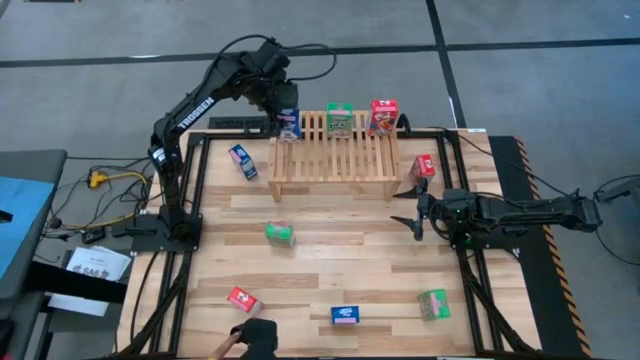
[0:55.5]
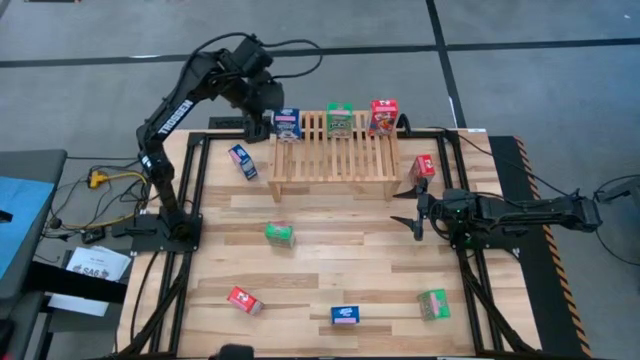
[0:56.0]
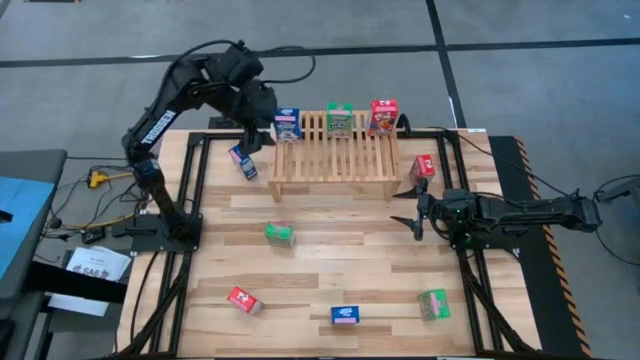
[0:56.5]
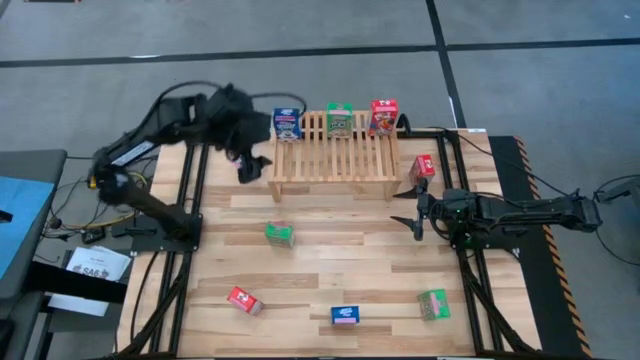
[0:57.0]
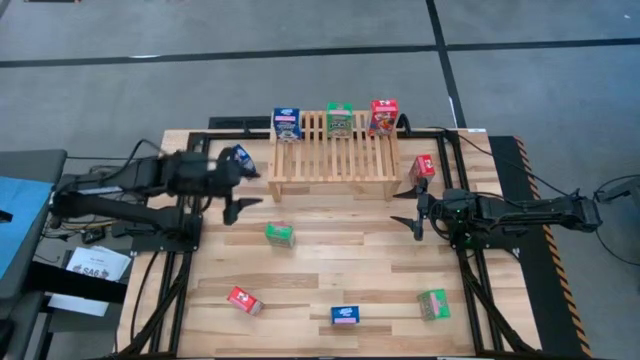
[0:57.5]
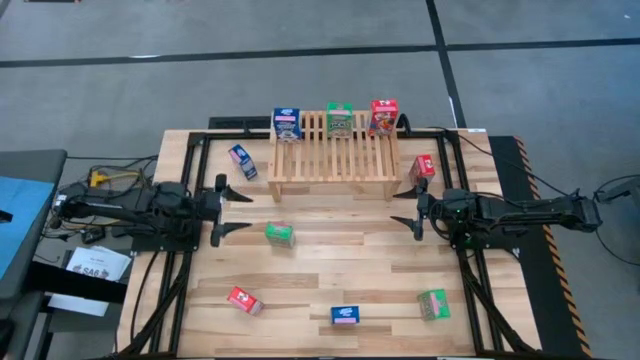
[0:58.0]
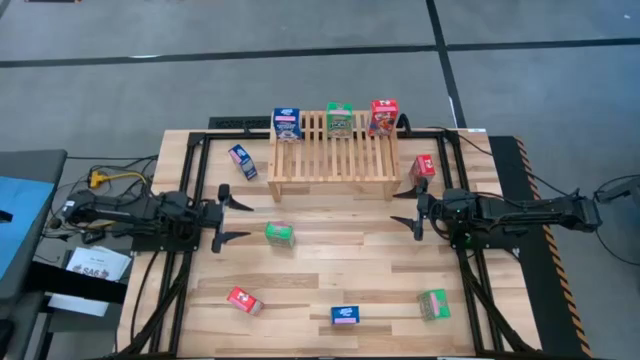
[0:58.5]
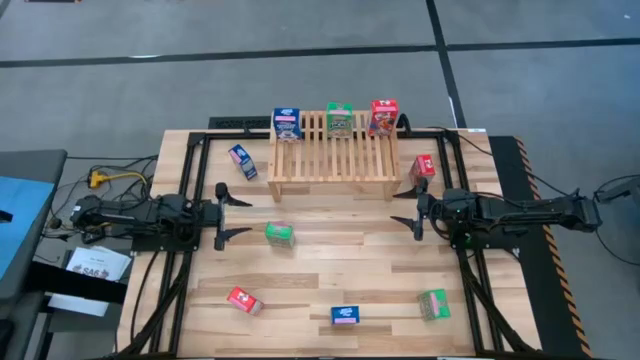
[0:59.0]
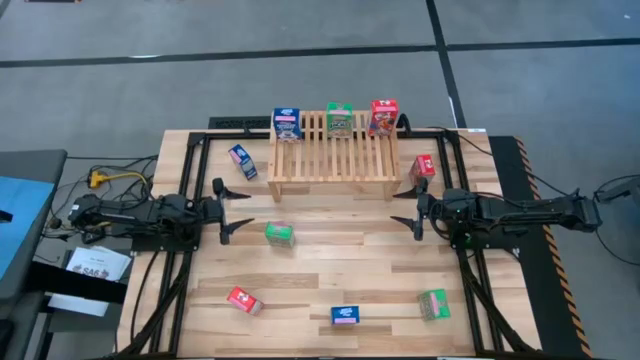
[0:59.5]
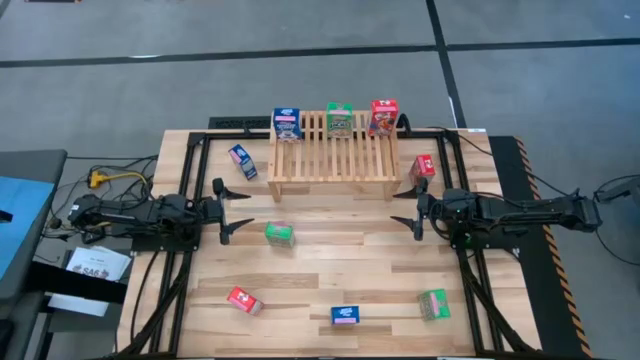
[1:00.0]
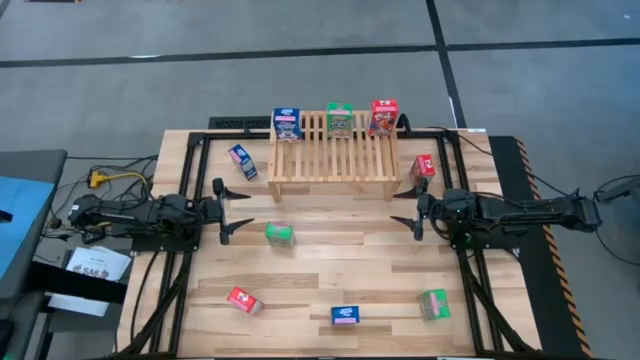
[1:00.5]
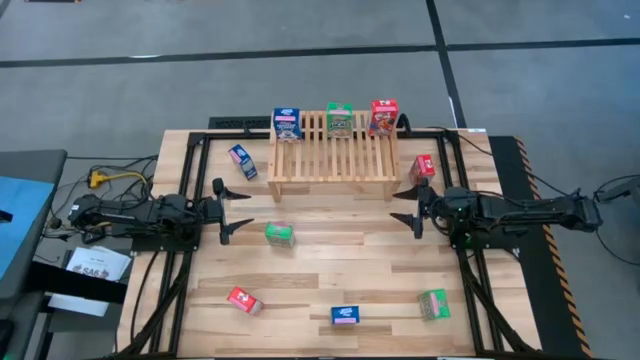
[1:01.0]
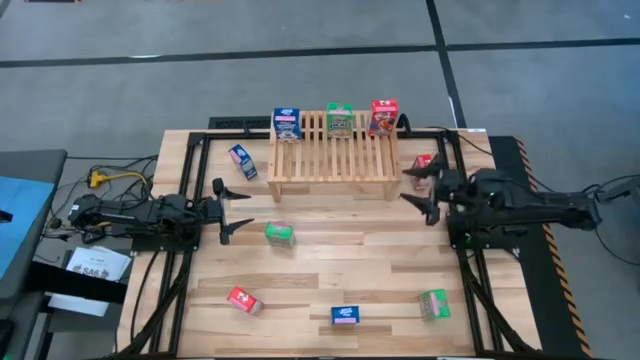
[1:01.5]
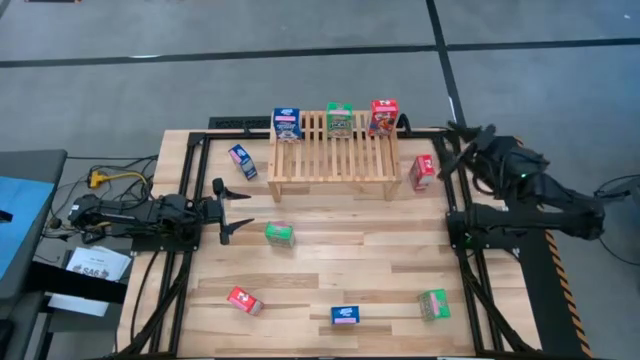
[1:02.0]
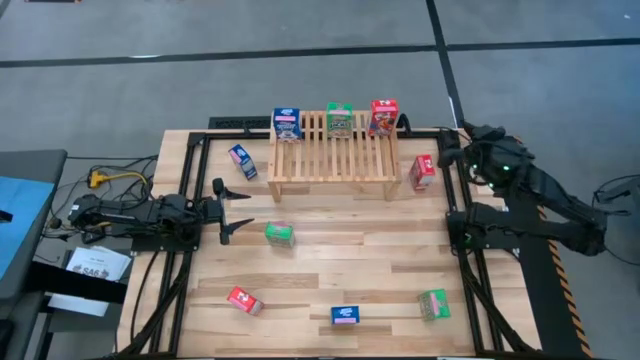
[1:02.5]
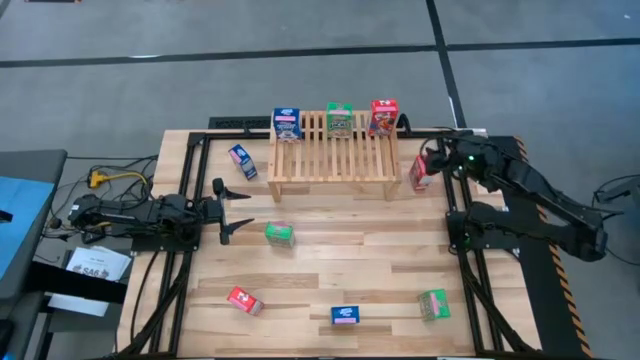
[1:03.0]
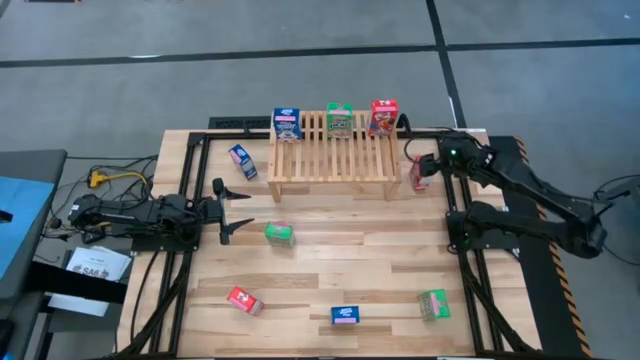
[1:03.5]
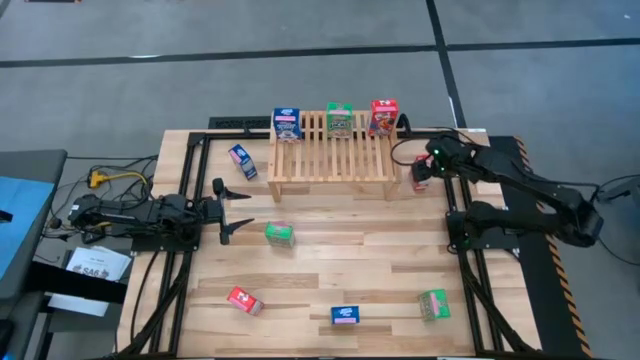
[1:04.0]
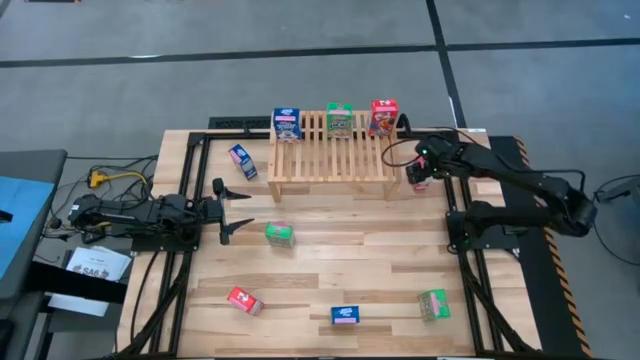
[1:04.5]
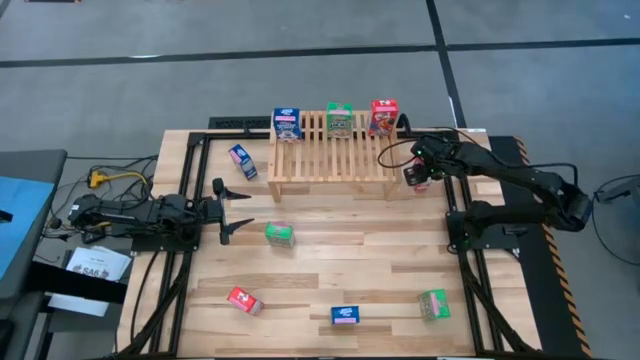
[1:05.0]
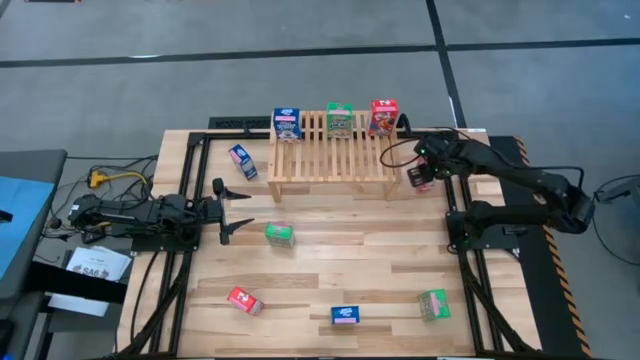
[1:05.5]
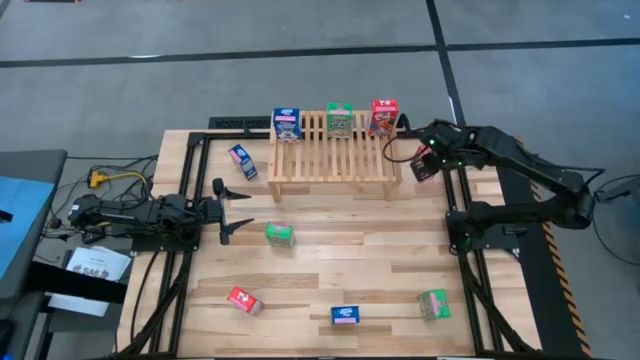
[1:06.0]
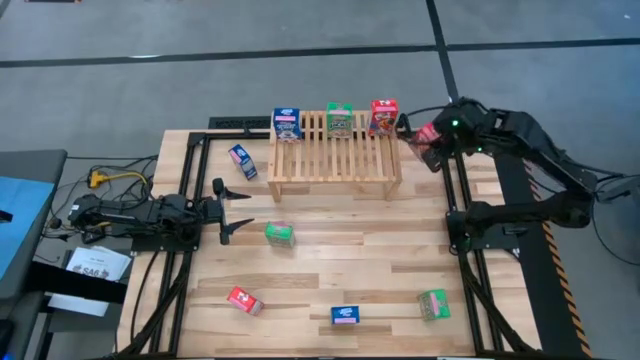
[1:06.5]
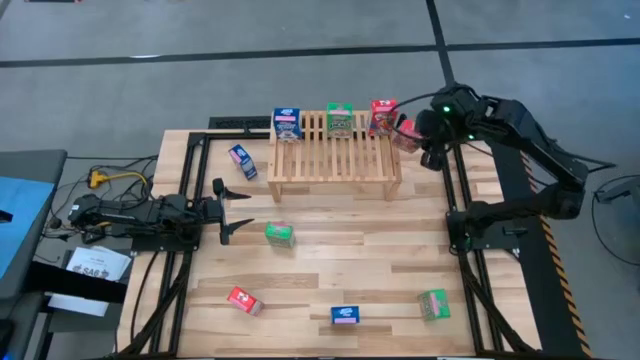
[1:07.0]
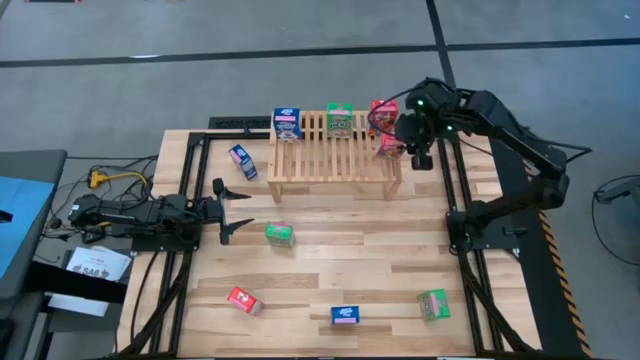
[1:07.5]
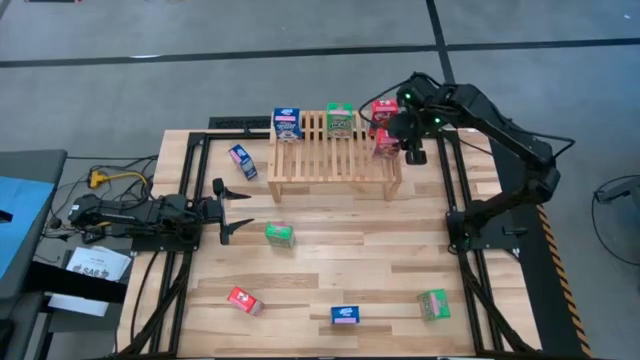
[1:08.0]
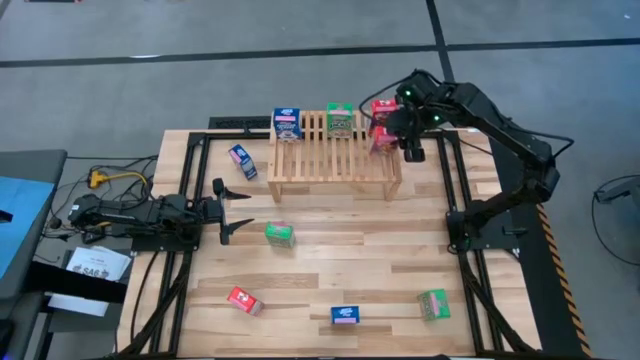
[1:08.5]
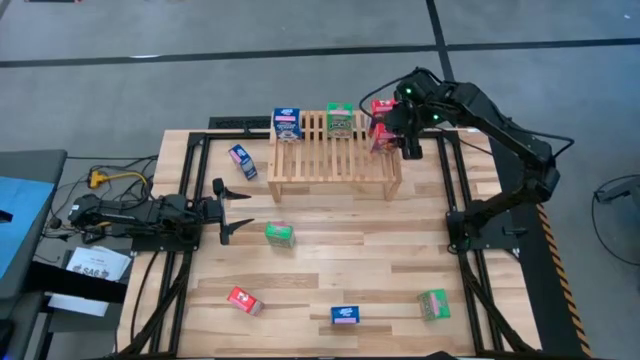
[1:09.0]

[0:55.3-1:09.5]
Task: Stack cereal on shelf
Put the top red cereal box on the shelf aligned with the other red cereal box

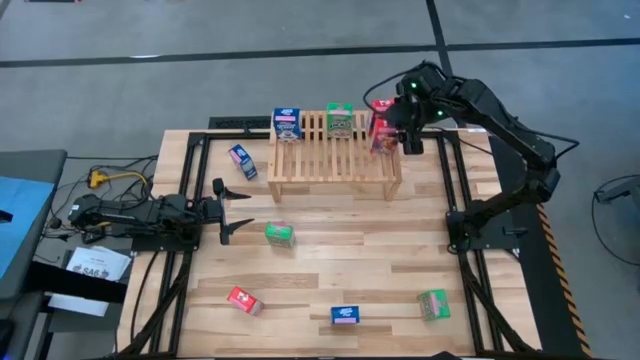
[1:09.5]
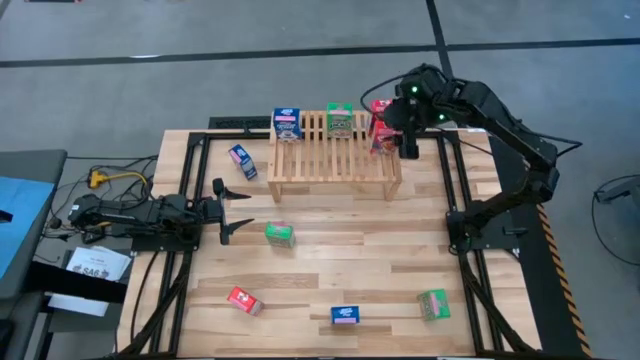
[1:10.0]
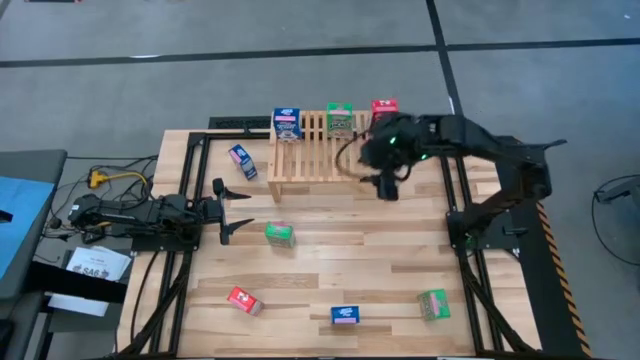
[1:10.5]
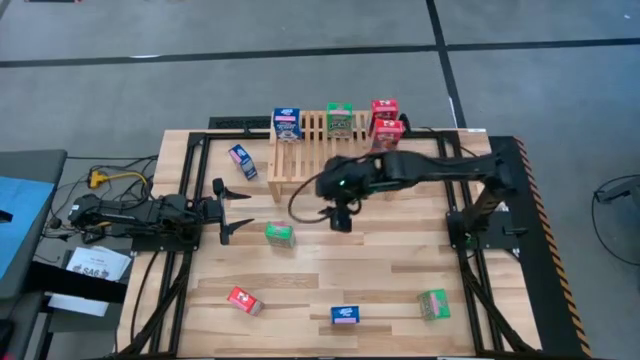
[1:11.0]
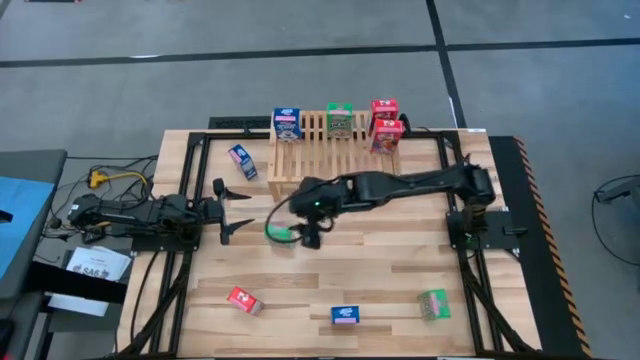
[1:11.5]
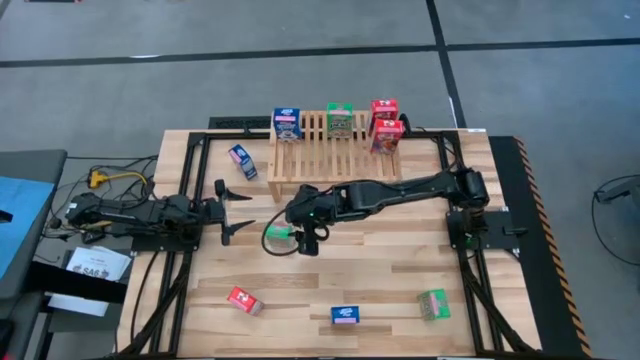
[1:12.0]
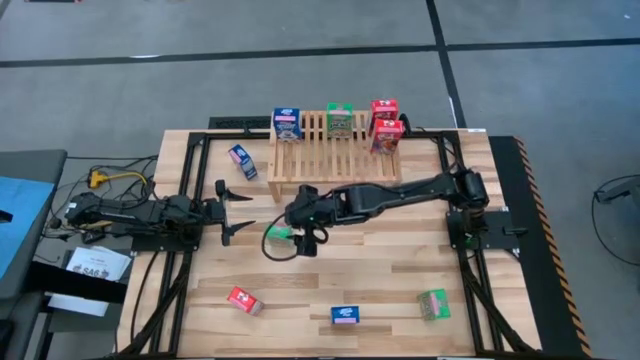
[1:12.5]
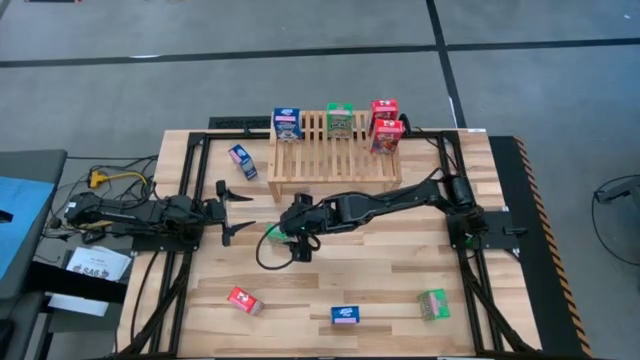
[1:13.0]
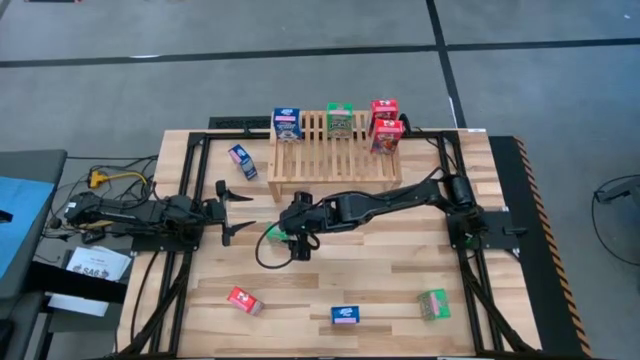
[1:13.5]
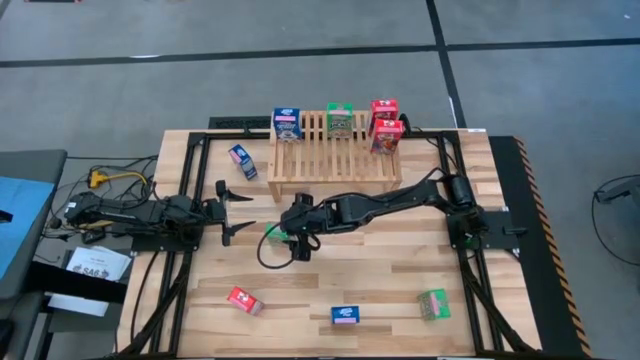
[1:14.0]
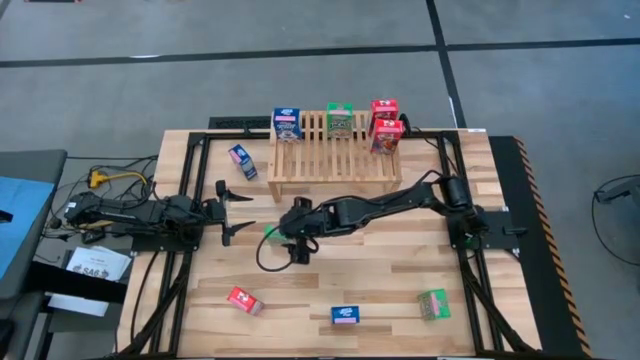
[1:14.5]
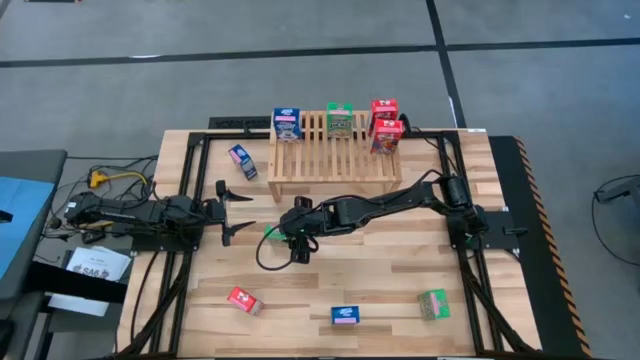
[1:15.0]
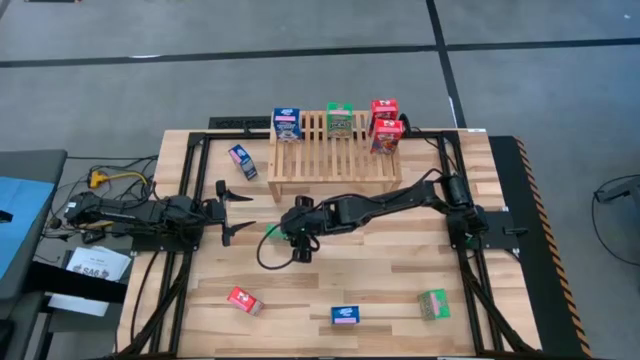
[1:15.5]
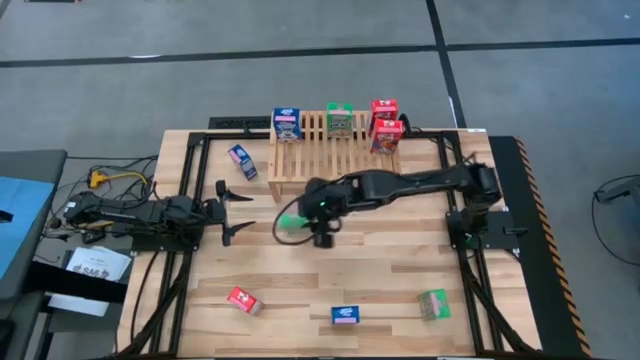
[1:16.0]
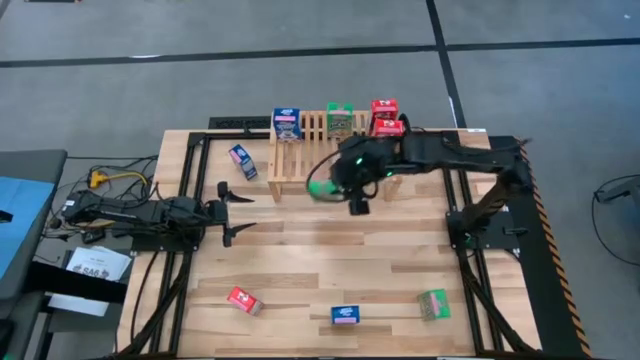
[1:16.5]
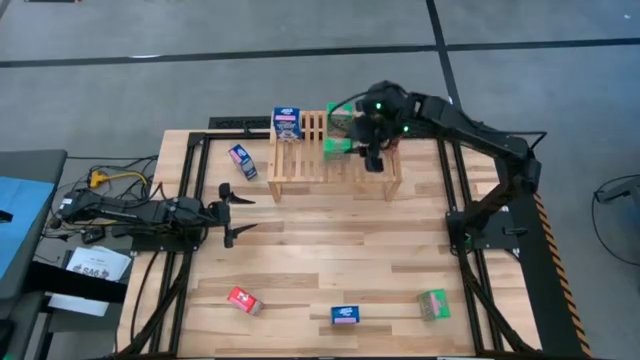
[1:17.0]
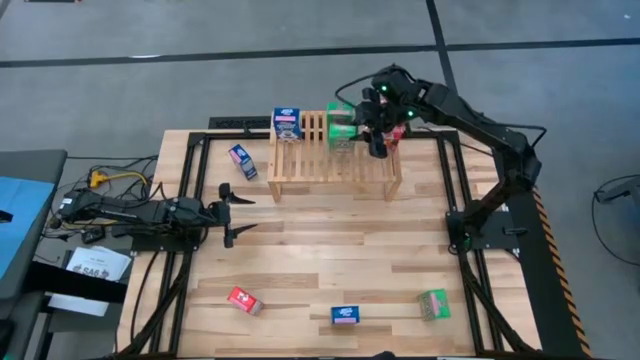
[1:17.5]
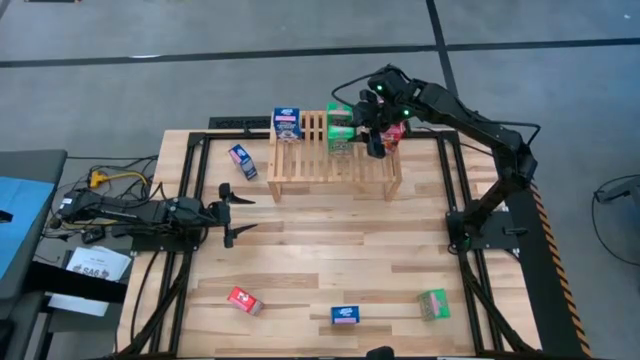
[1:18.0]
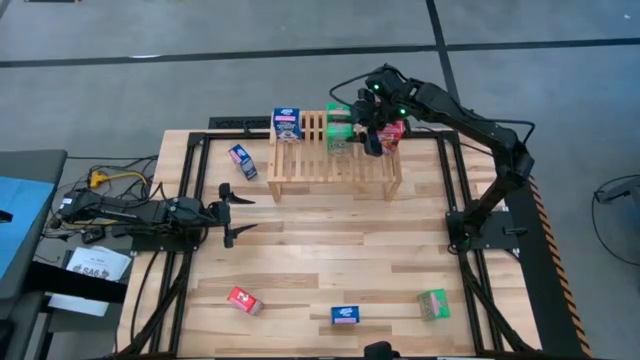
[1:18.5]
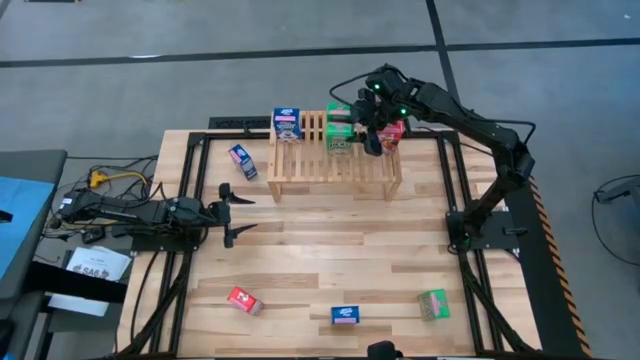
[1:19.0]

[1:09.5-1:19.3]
Put the top green cereal box on the shelf aligned with the other green cereal box
